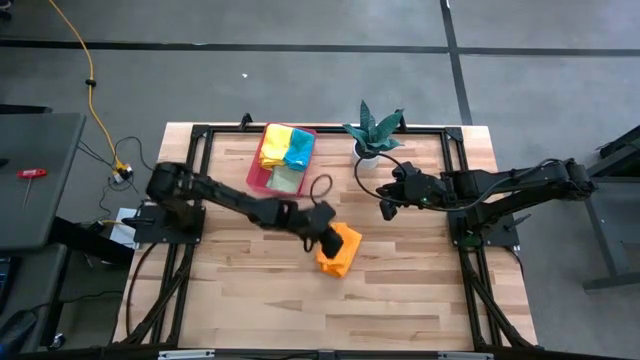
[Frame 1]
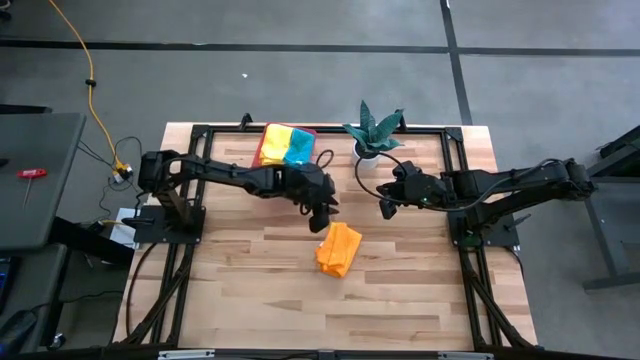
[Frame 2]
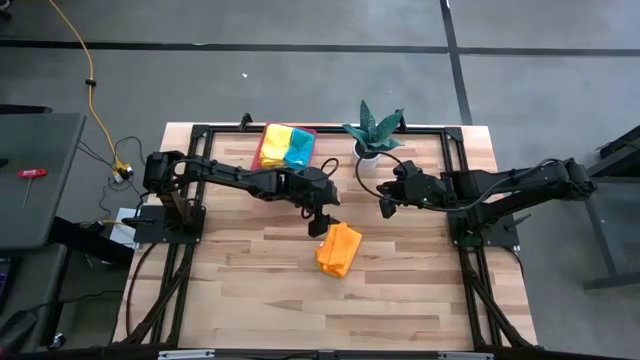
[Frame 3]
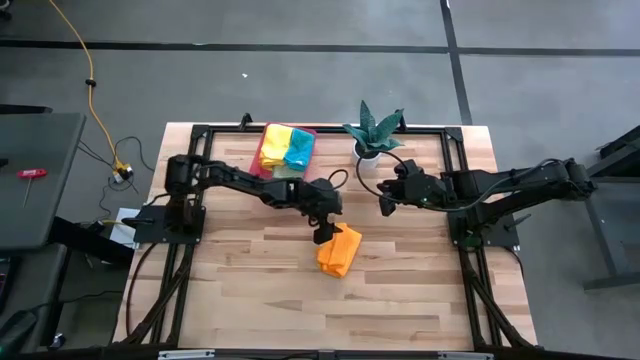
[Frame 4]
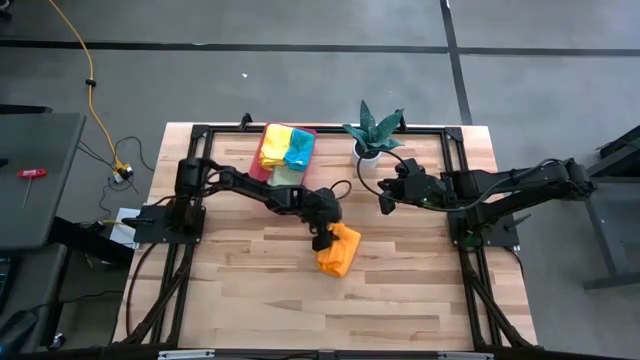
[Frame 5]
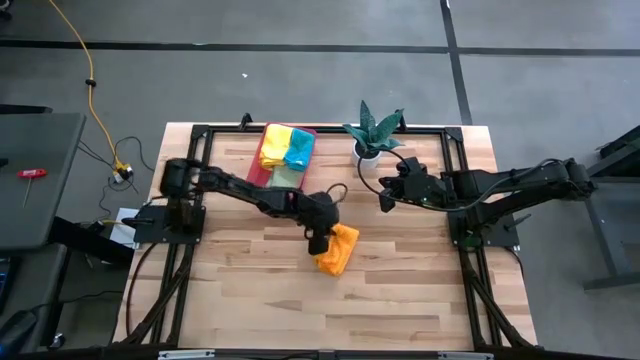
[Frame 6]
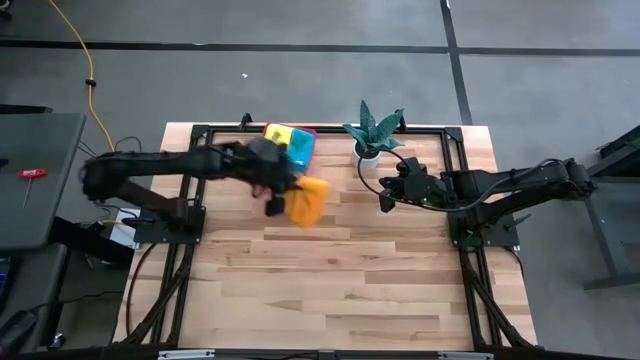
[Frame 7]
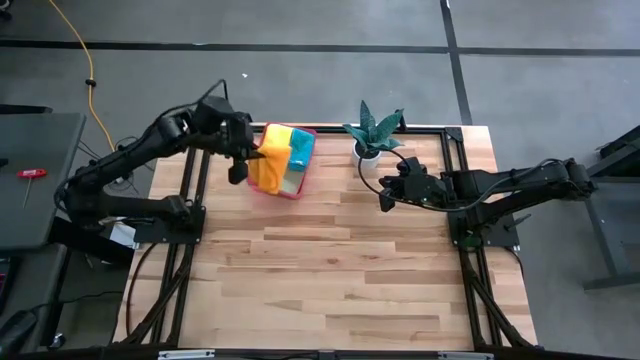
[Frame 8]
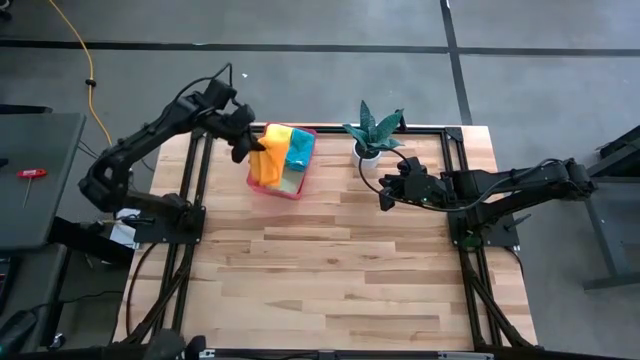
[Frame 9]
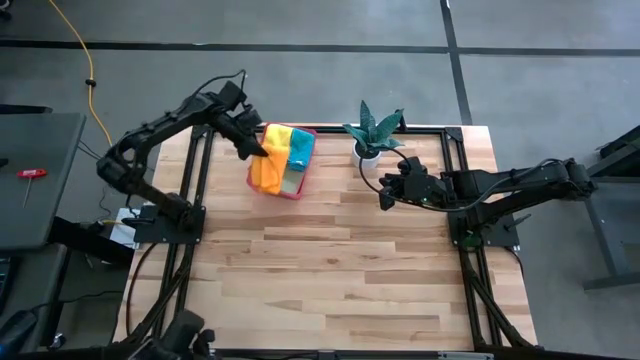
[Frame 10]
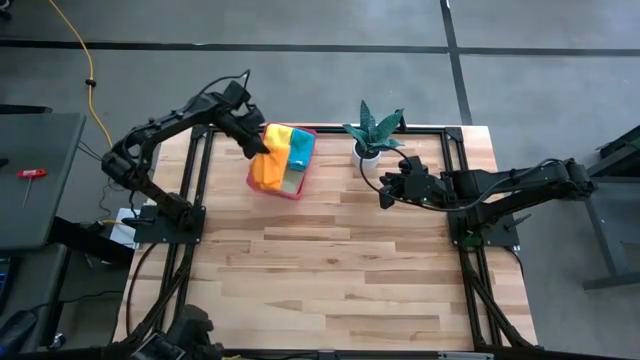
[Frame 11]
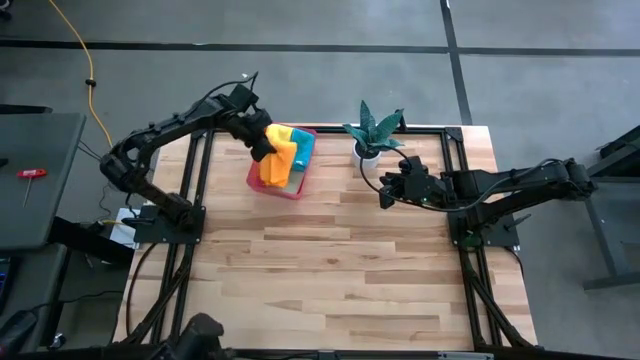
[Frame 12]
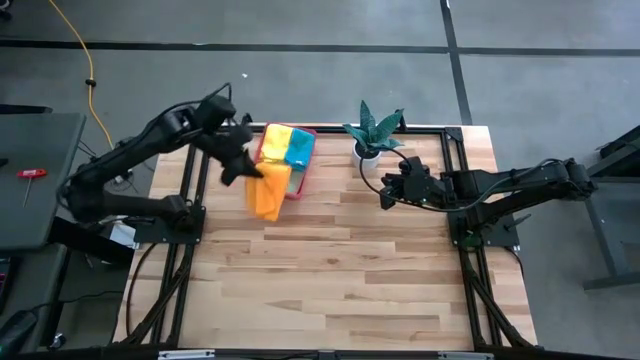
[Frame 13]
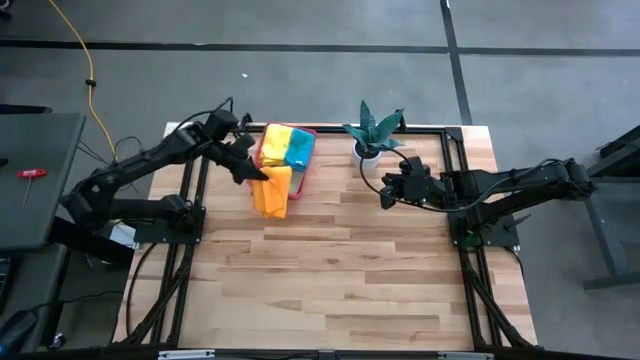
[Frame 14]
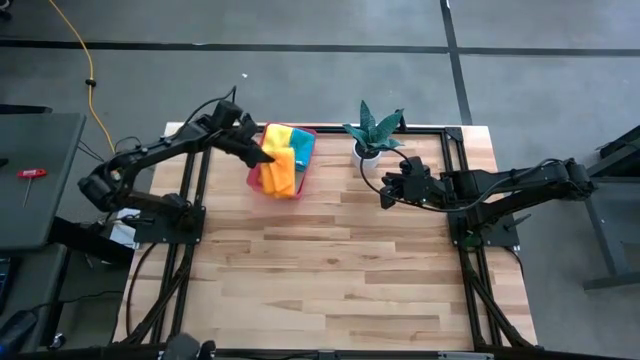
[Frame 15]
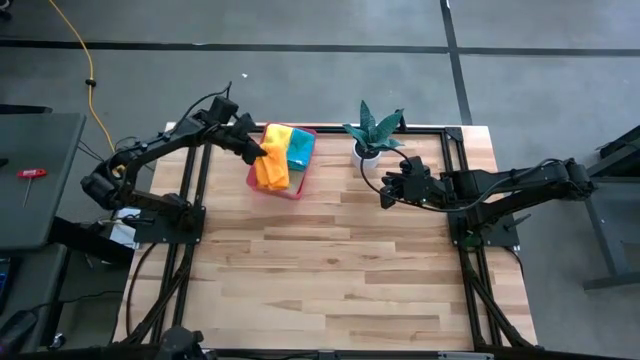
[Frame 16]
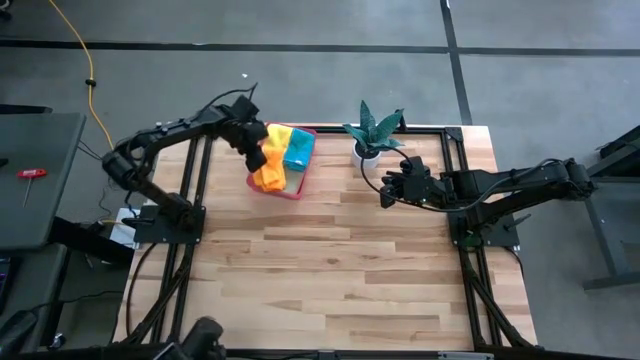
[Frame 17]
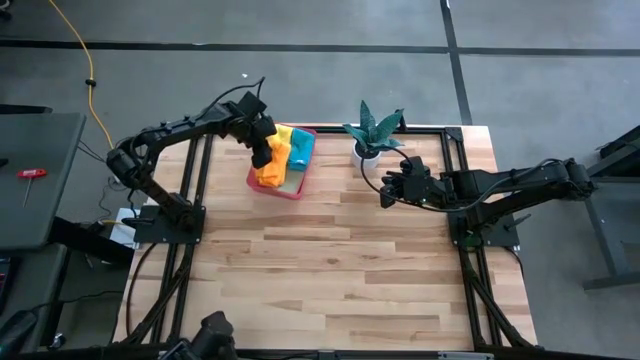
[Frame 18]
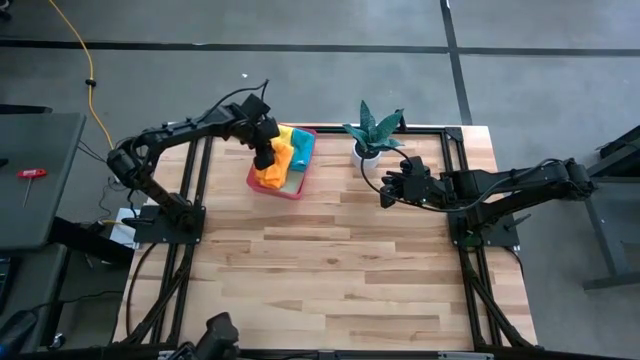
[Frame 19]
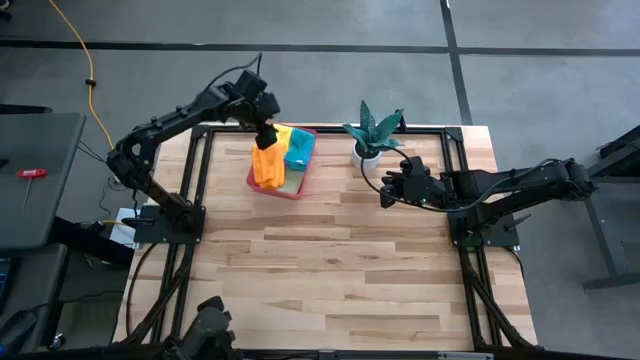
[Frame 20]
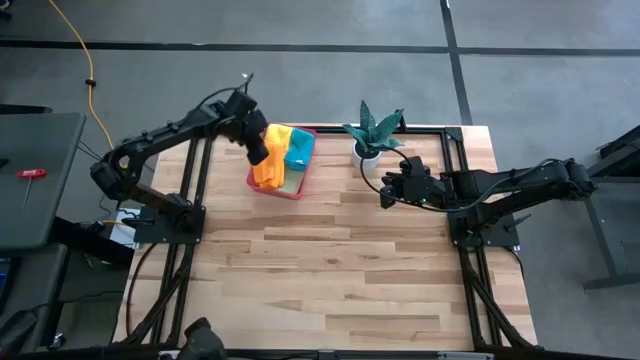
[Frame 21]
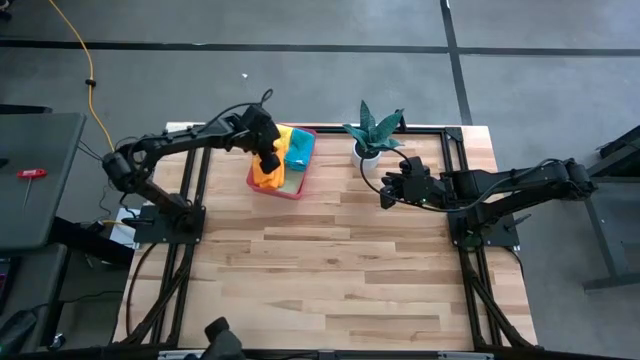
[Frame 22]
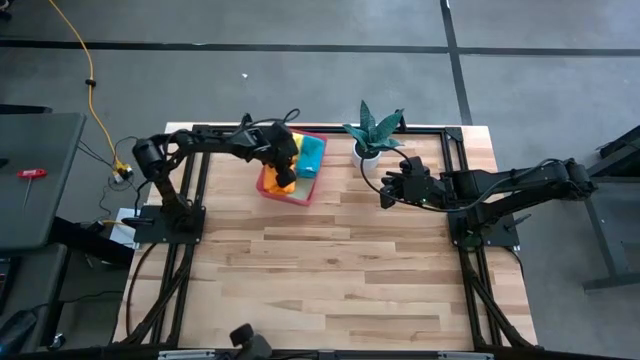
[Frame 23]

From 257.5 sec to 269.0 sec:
Task: Fold microfiber towels
Put the folded orange microfiber cloth into the red bin

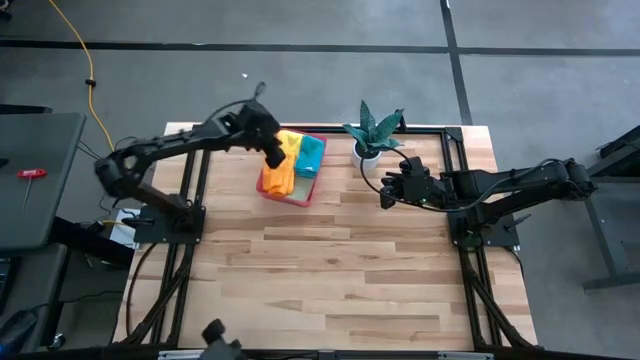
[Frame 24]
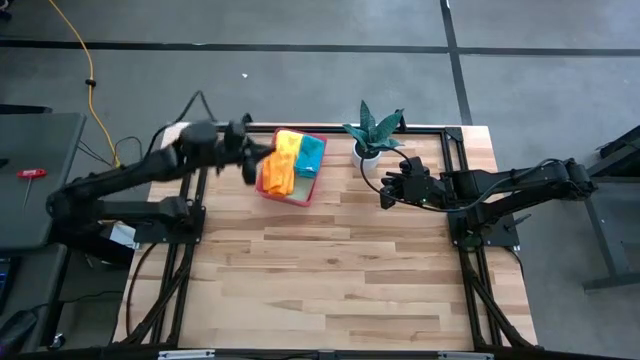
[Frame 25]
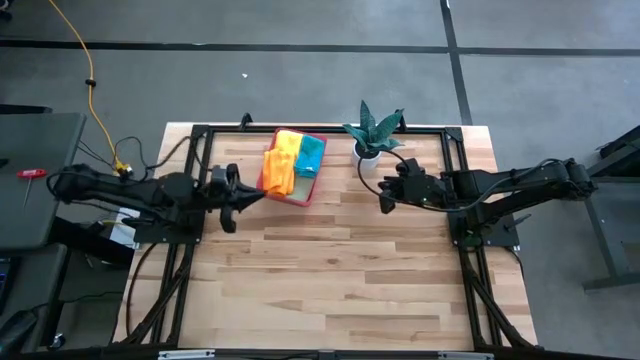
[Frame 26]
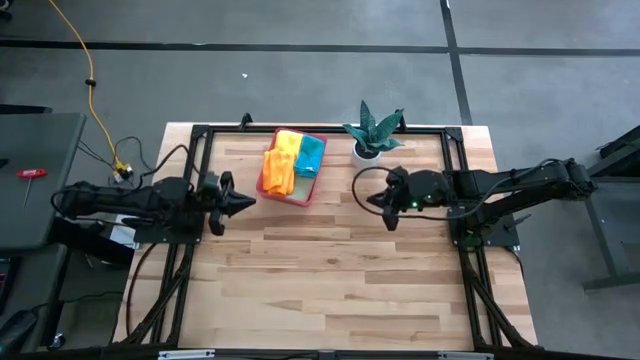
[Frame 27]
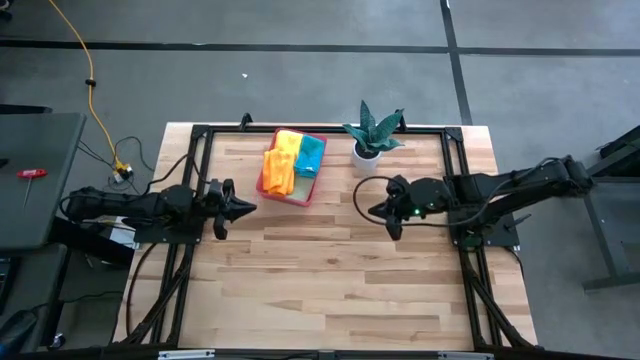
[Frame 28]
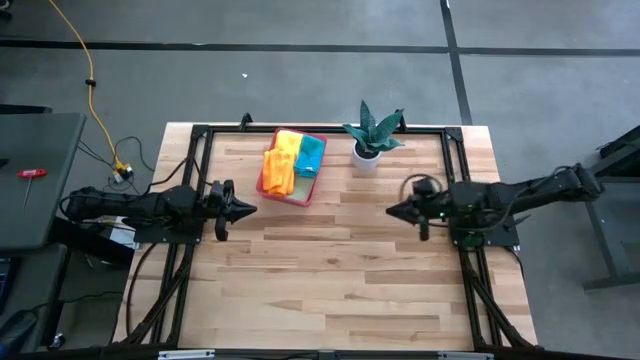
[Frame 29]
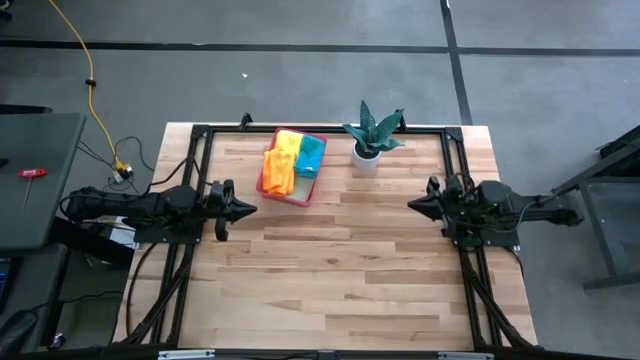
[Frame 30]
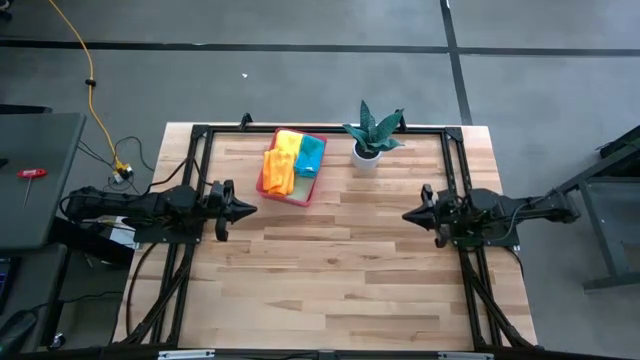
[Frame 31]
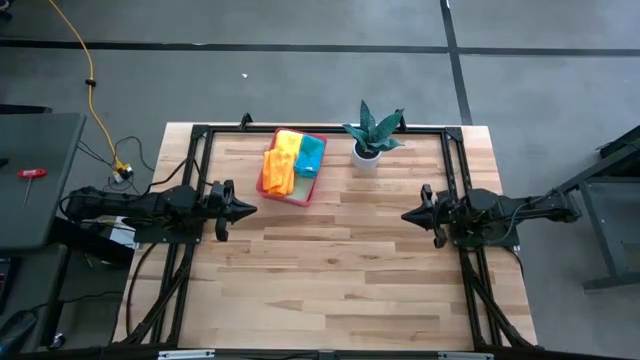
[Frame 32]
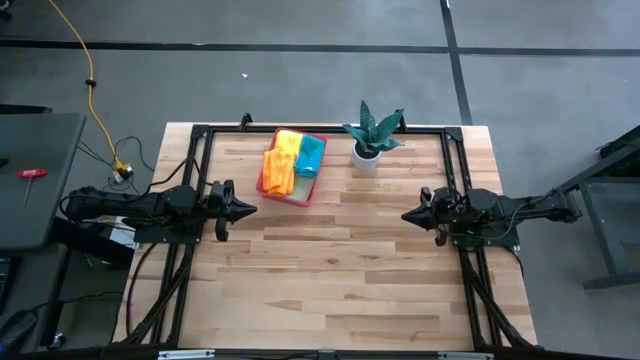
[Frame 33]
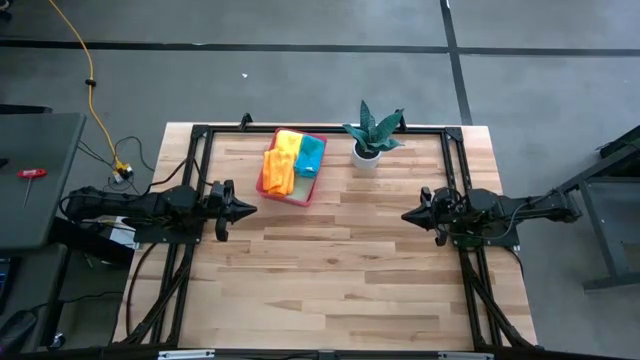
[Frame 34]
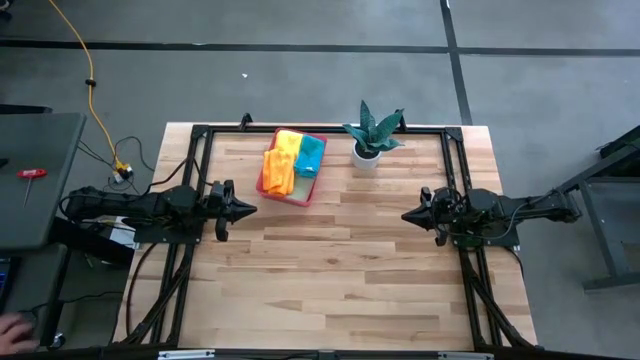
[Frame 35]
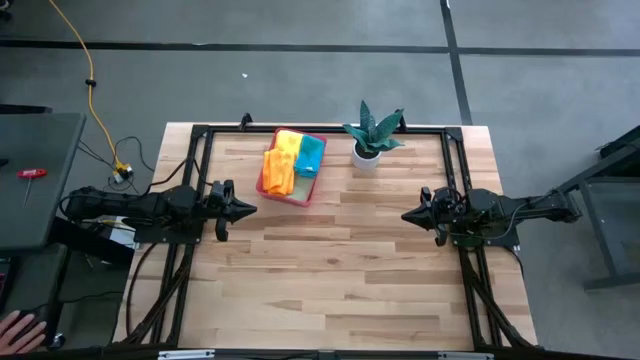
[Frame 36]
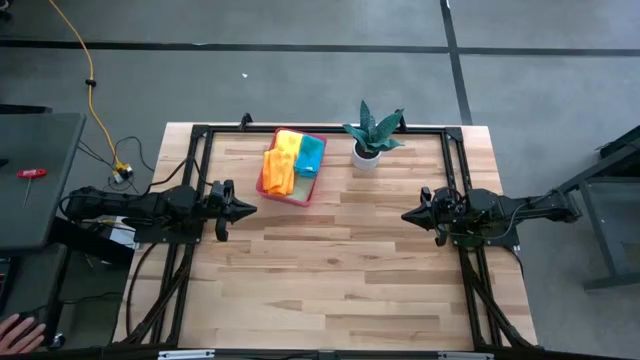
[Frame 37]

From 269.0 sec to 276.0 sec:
Return to Home Position

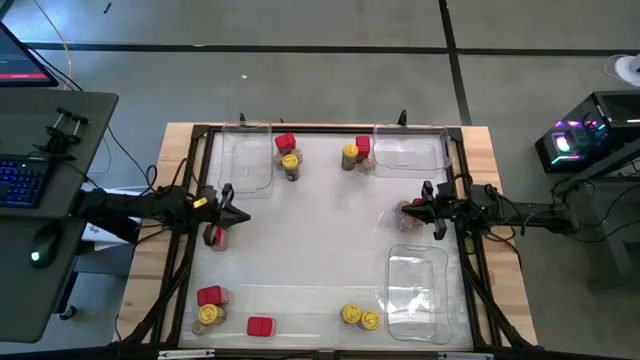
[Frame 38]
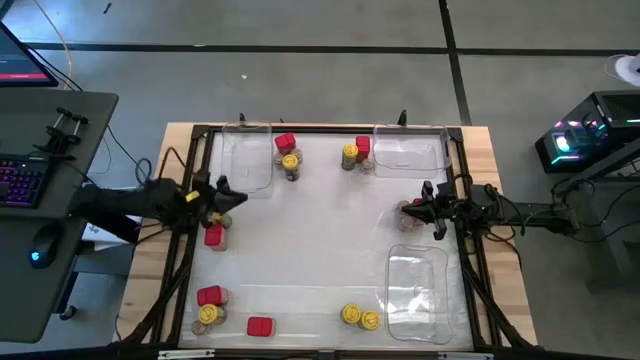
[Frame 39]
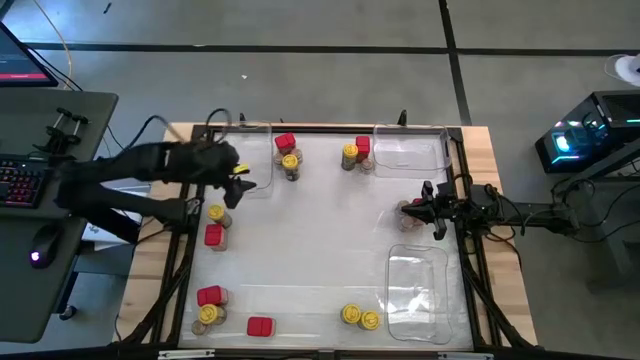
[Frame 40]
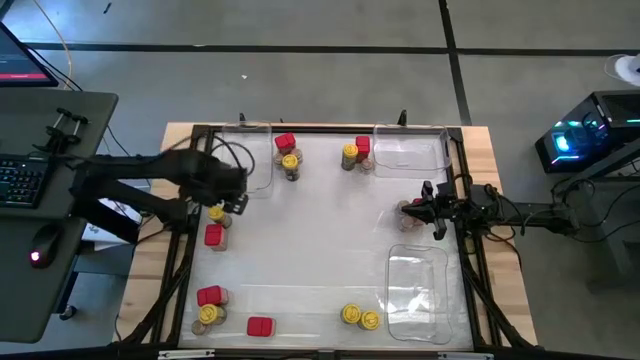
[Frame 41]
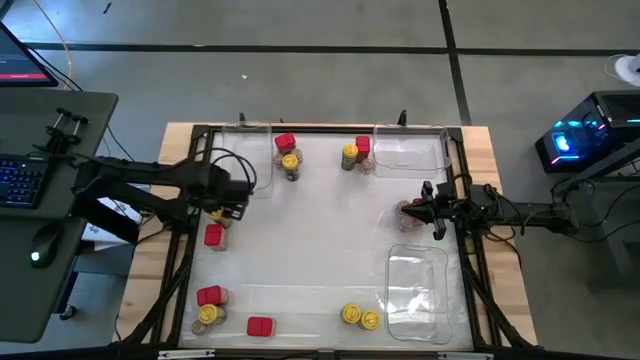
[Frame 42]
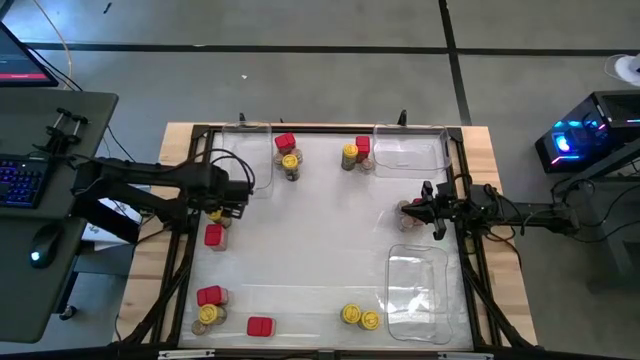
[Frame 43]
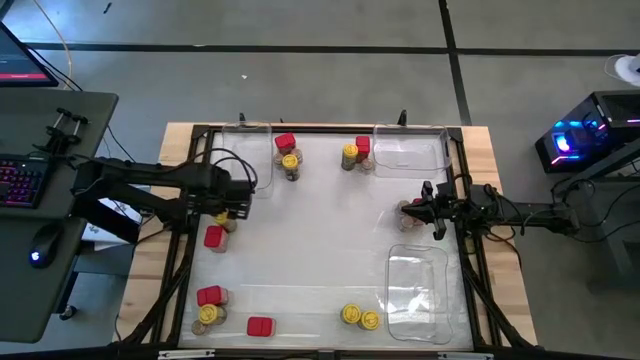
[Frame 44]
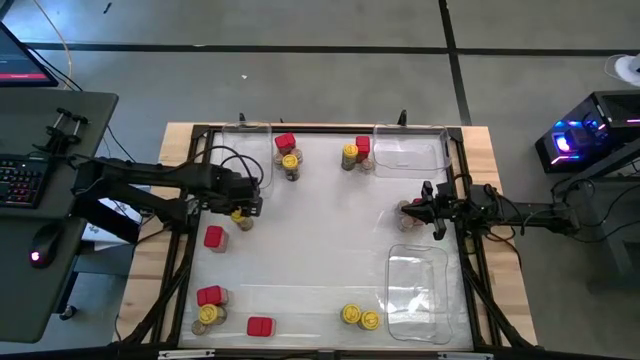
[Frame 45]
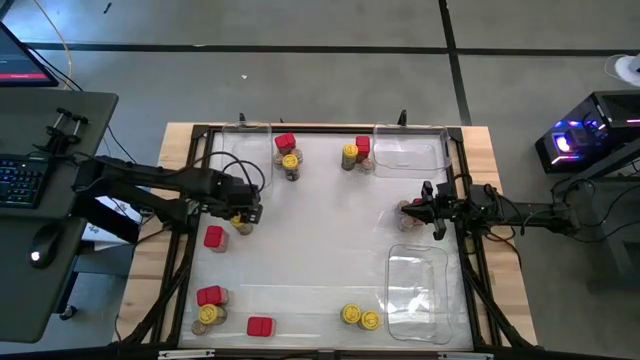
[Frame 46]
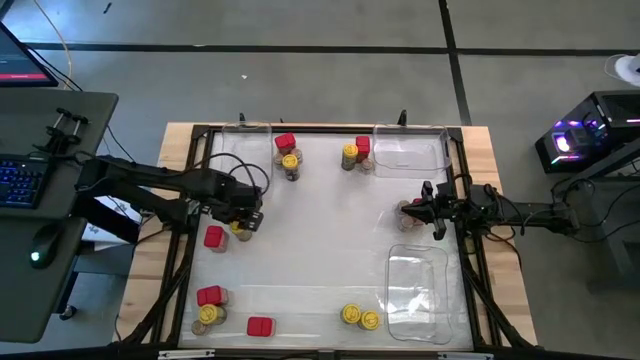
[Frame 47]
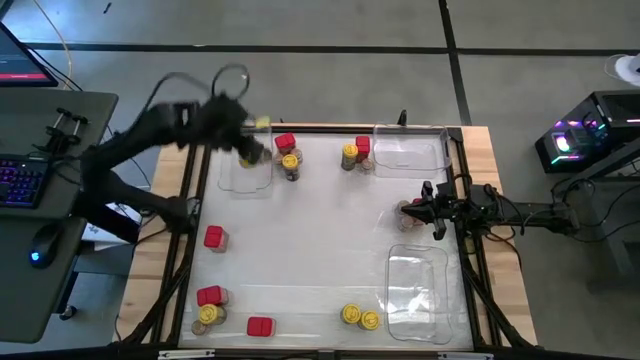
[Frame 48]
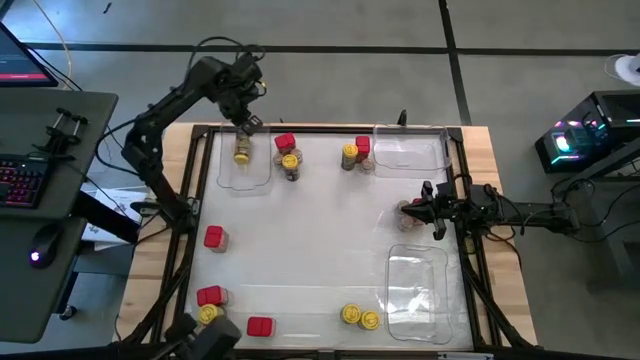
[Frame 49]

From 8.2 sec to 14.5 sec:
Task: Sort spices by type
Put the yellow seasoning bottle into the top left transparent bin
